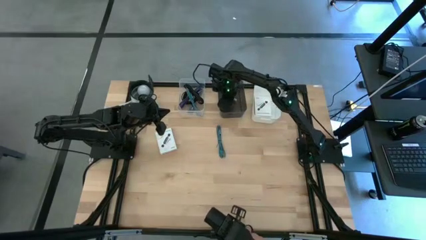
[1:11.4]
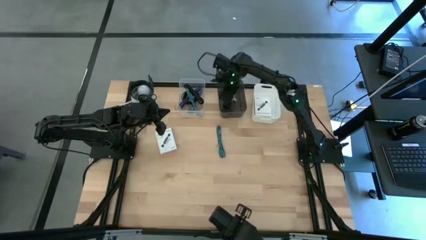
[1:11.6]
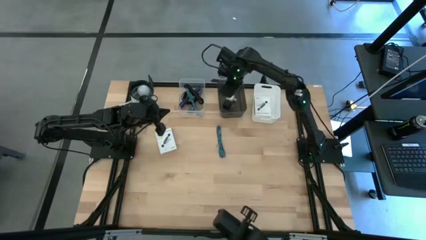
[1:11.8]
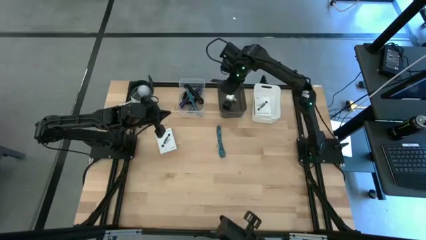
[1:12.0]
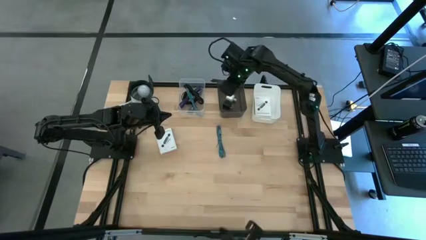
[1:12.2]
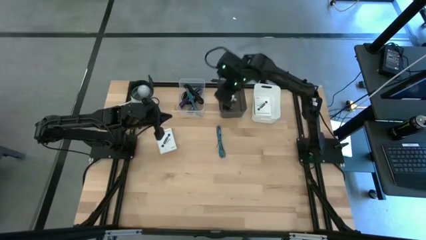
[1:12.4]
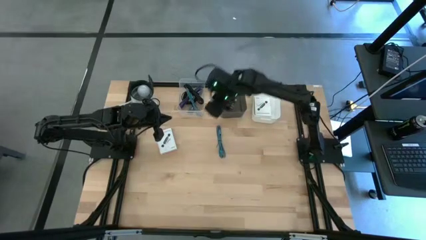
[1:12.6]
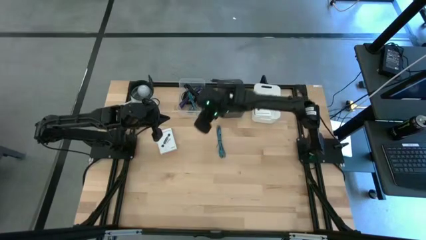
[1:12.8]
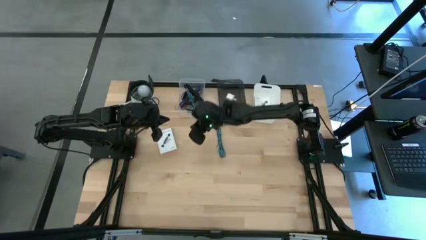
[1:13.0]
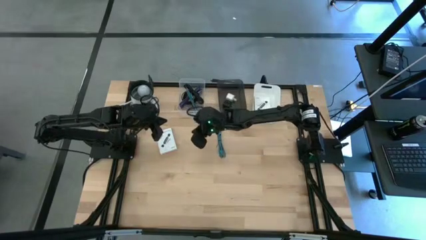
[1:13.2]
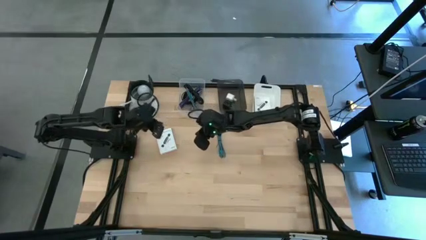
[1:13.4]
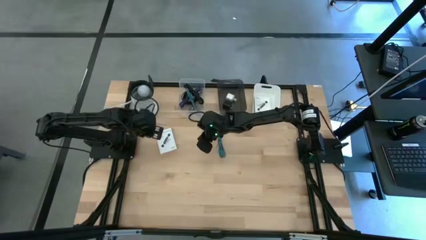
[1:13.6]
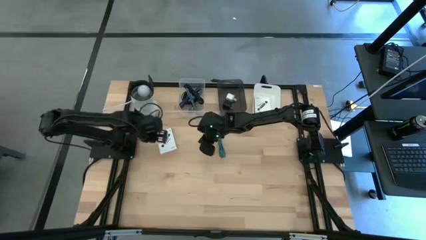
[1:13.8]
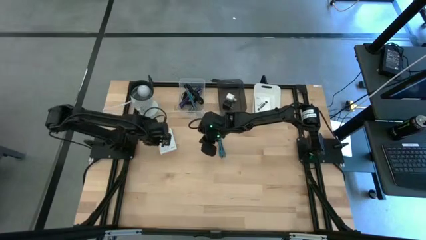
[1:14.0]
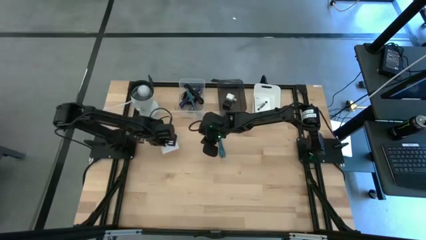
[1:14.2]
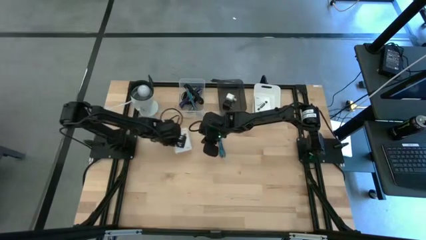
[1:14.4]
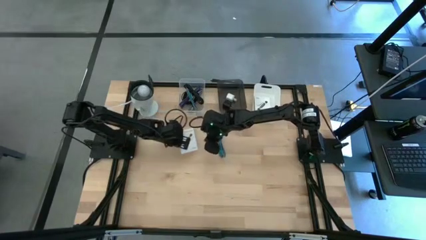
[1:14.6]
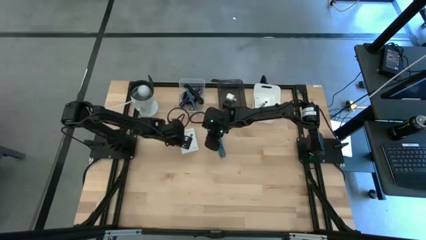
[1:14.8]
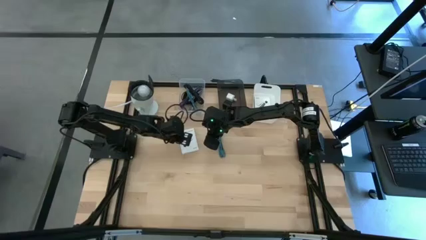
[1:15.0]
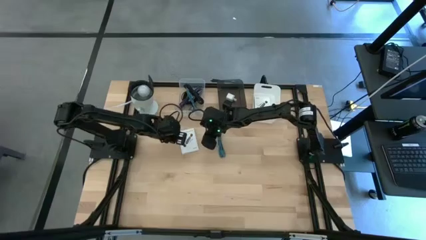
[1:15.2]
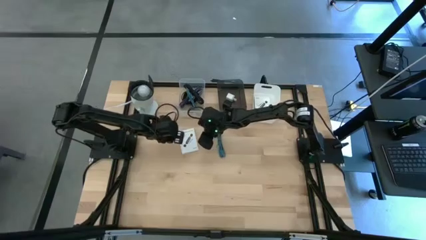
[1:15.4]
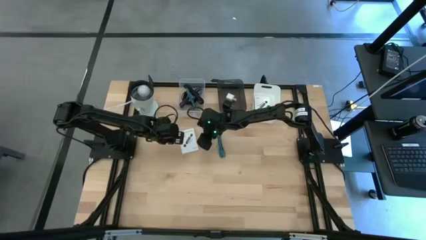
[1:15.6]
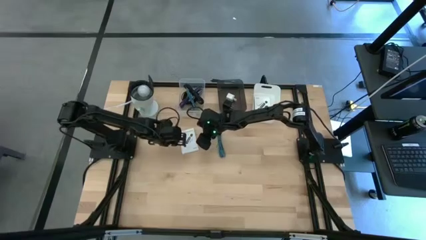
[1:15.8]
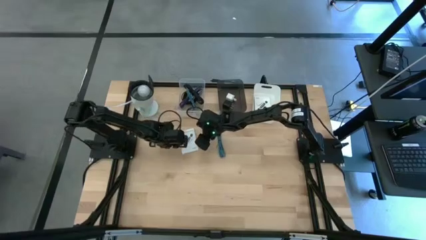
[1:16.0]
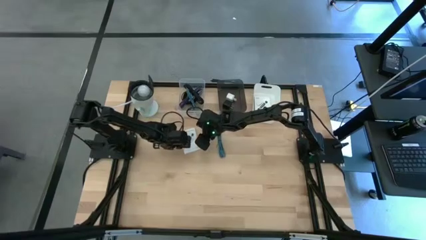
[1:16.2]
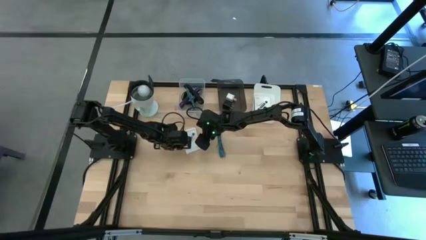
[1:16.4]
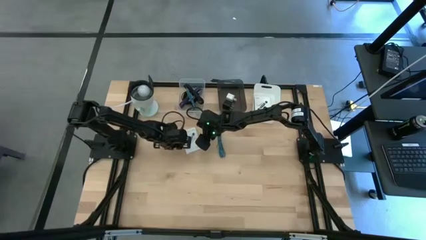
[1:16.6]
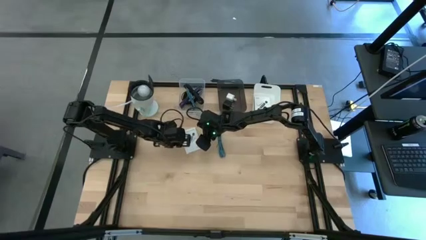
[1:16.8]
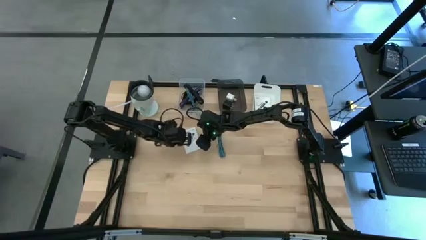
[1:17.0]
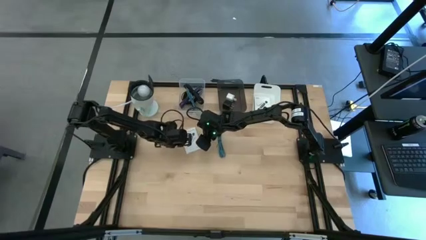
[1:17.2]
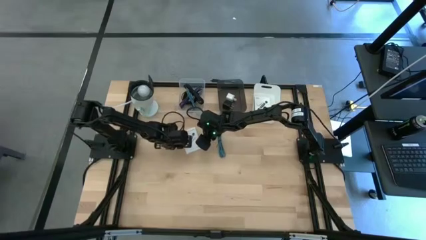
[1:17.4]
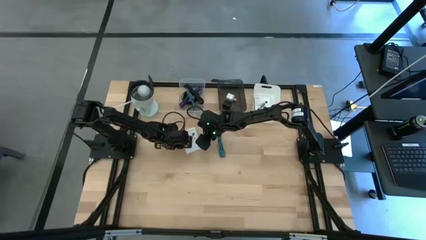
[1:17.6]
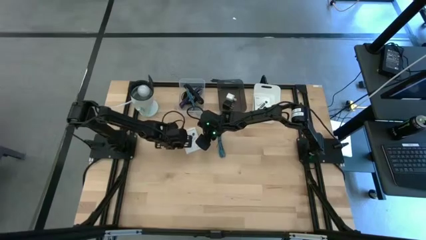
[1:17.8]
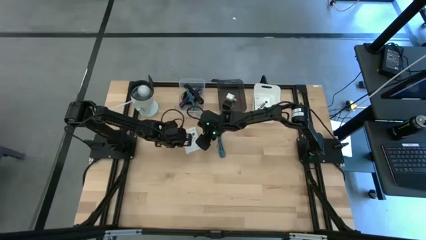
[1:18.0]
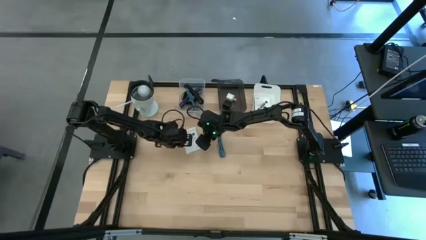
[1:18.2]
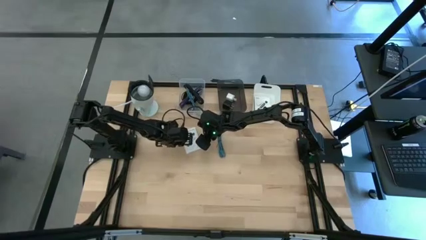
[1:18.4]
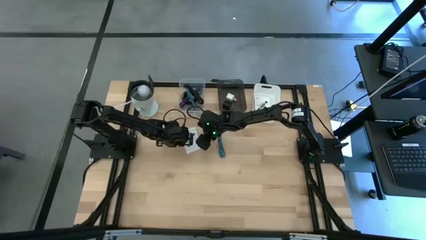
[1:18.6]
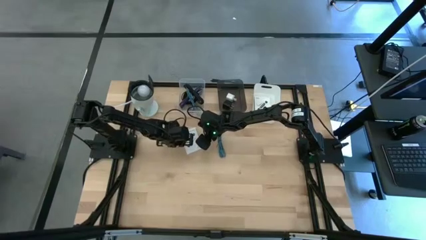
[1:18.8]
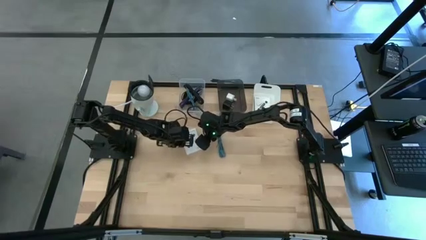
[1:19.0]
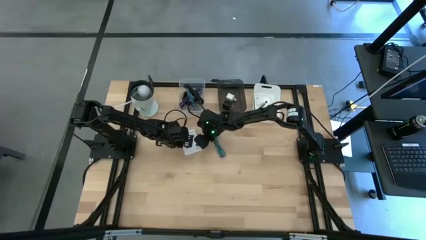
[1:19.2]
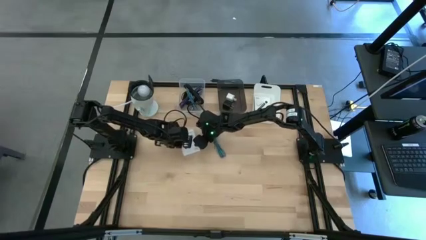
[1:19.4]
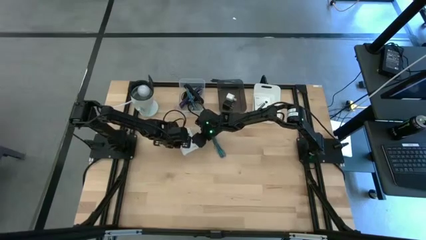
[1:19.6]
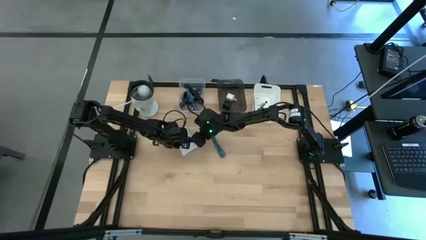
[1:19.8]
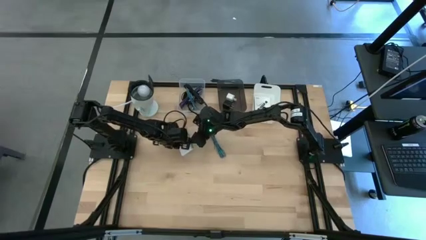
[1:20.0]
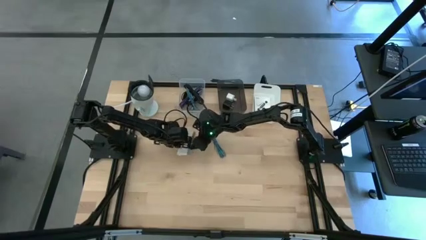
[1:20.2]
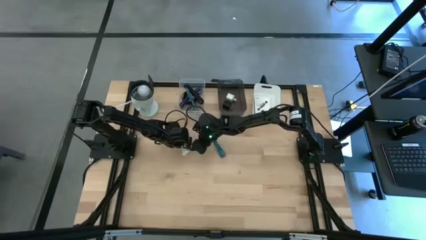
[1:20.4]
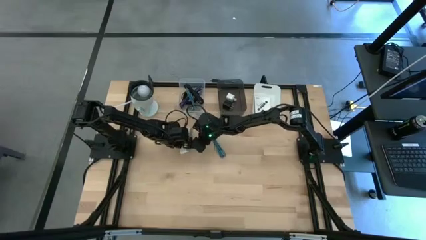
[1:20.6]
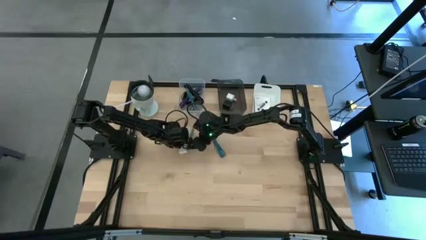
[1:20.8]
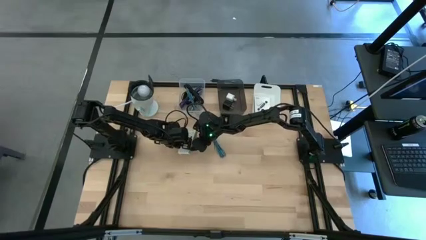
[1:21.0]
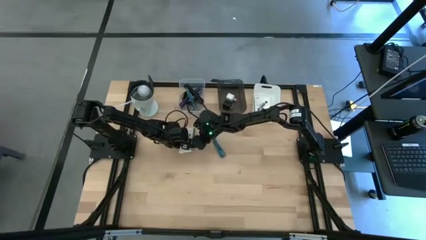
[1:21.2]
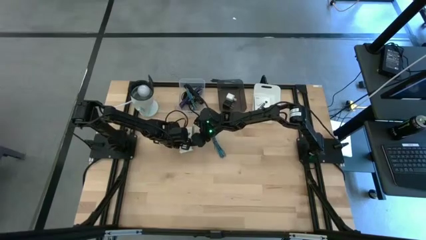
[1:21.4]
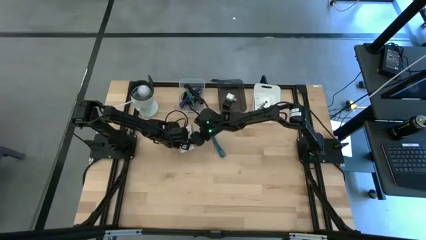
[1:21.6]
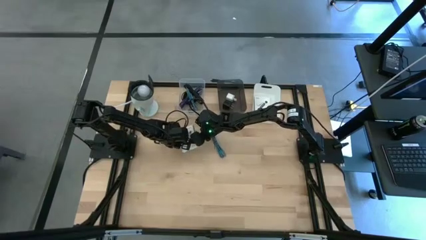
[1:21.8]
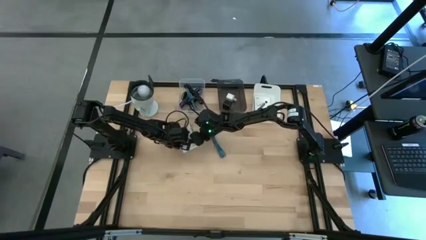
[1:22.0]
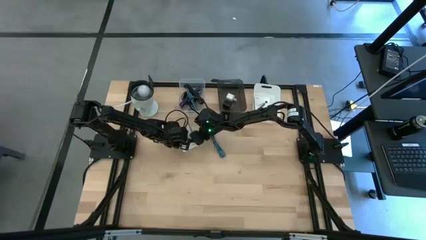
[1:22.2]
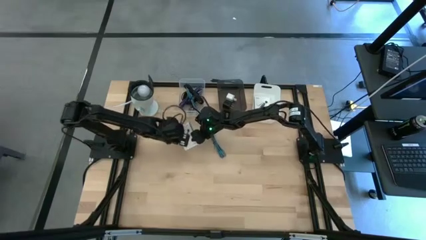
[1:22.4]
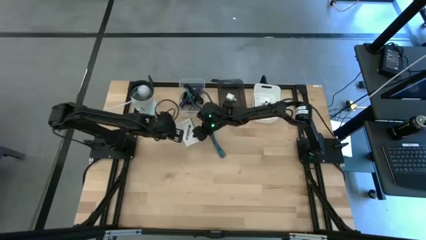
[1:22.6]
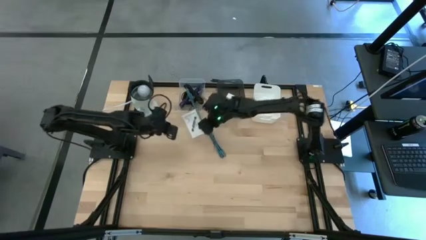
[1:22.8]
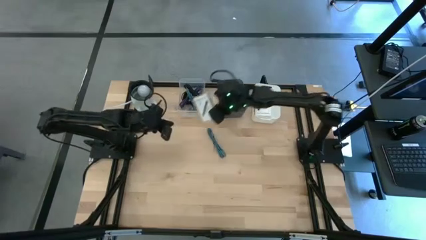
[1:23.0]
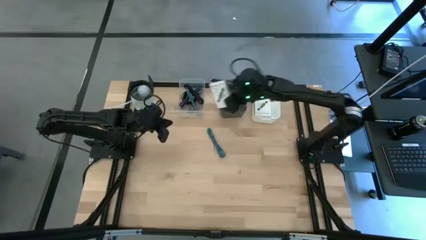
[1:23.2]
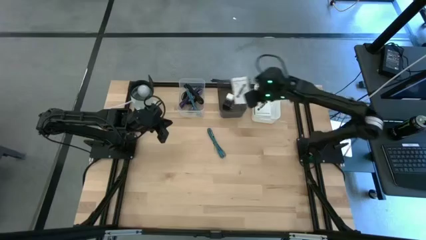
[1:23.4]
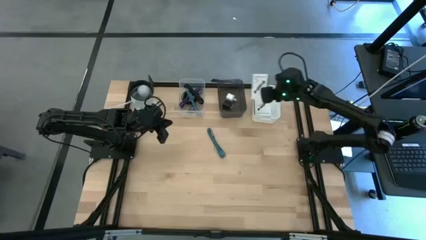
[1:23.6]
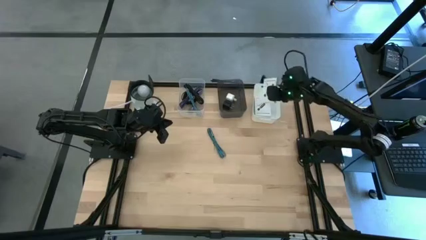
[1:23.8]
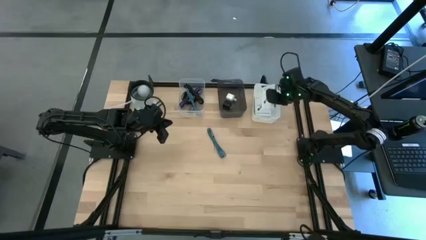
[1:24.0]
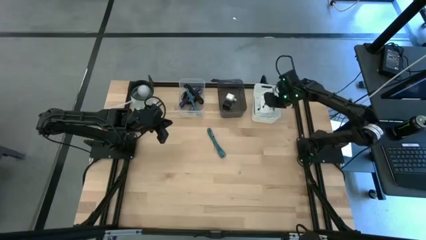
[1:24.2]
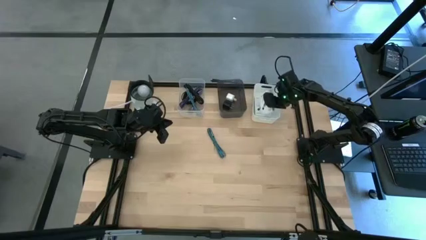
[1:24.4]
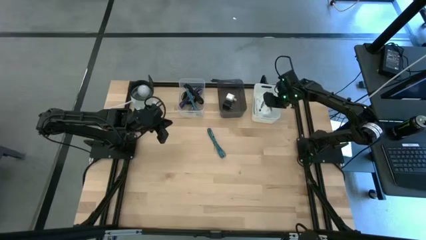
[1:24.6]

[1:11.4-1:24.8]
Task: Pick and place items into bin
Put the white card reader box into the white bin

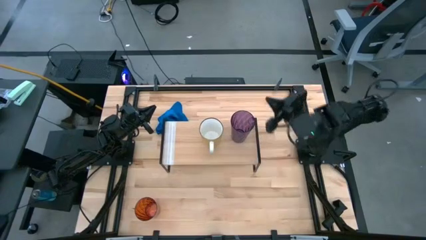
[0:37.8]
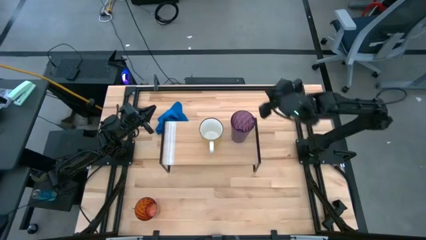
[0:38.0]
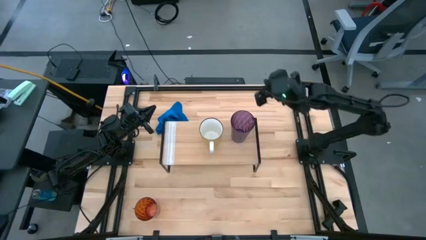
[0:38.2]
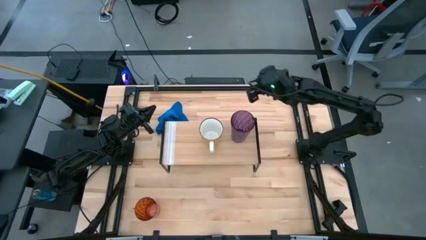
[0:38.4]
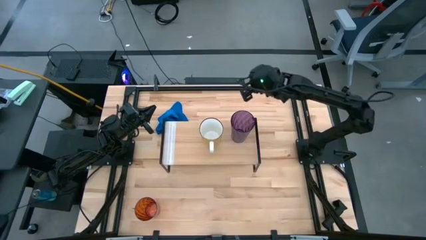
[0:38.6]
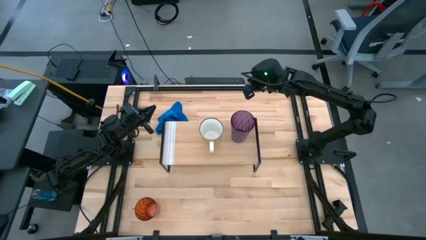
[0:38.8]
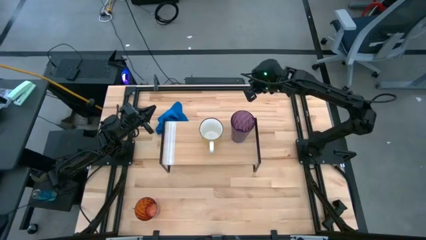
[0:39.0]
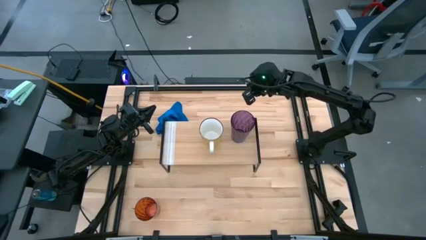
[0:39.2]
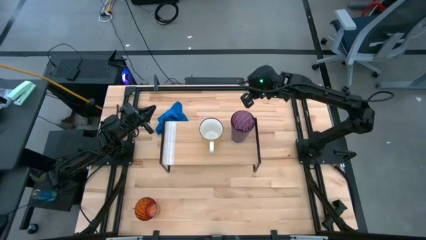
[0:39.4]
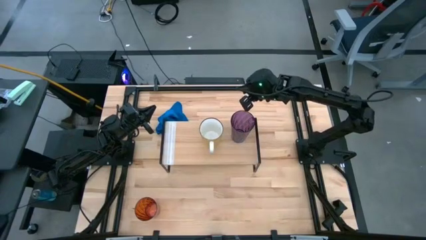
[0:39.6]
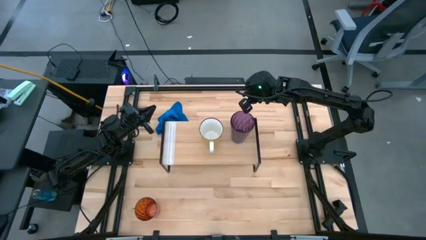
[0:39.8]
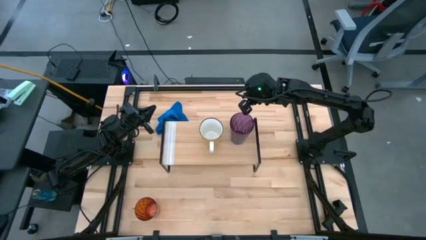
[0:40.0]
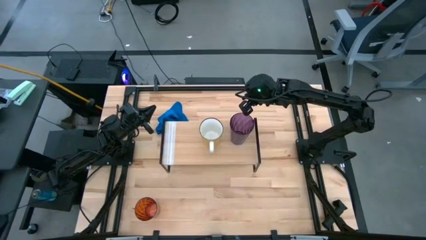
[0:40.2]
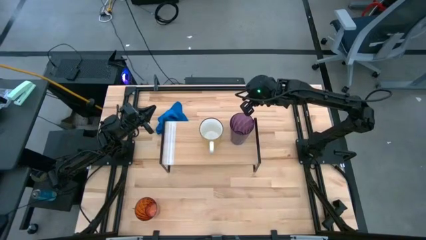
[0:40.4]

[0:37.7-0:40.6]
Task: Stack small to large cups/mugs on shelf
Adjust the violet cup on the shelf
